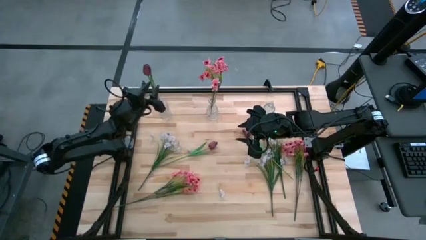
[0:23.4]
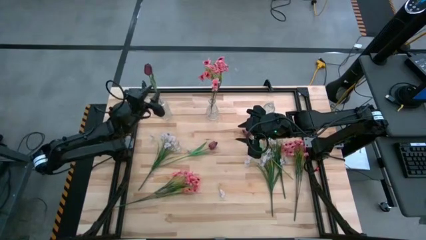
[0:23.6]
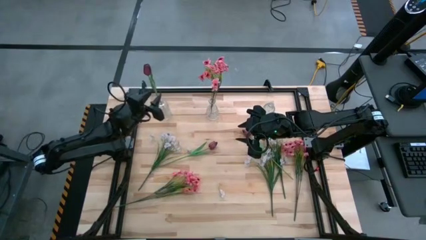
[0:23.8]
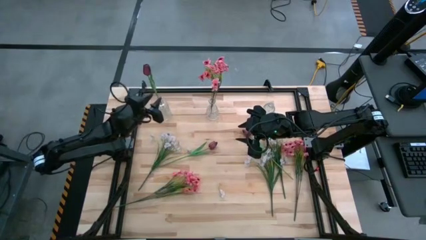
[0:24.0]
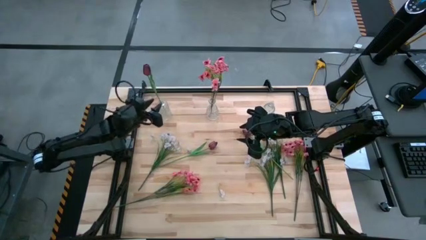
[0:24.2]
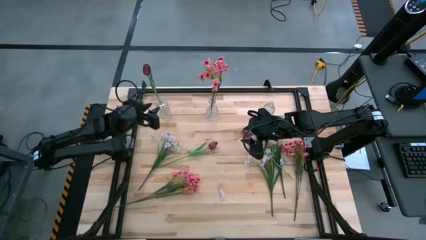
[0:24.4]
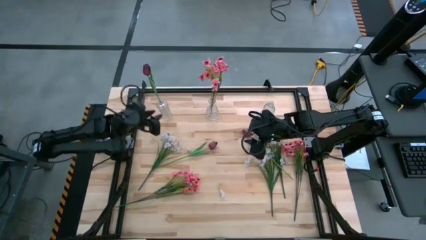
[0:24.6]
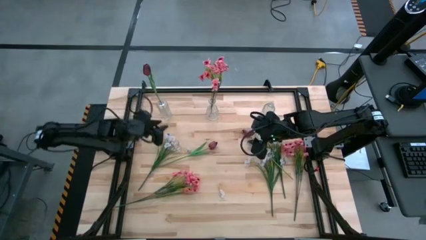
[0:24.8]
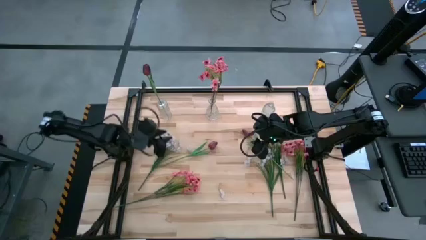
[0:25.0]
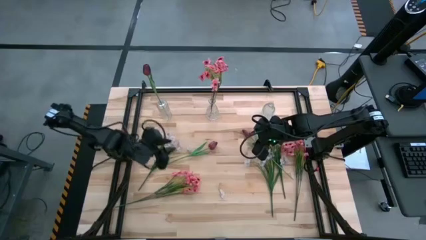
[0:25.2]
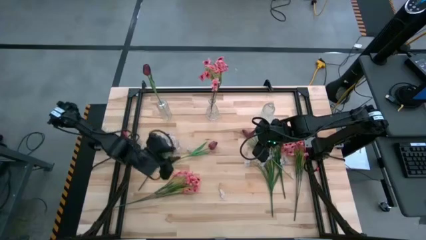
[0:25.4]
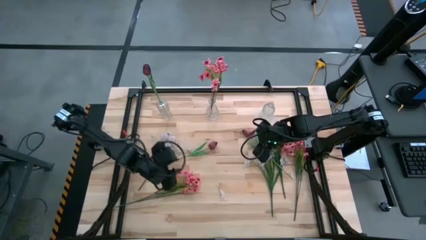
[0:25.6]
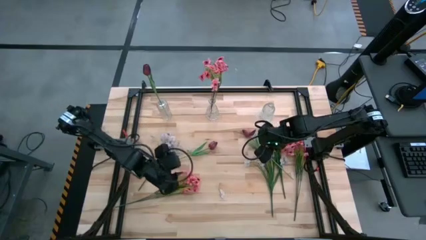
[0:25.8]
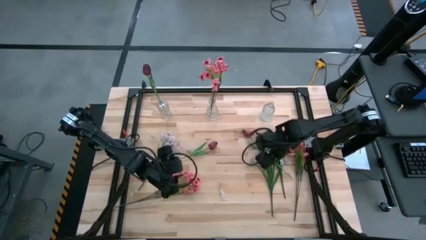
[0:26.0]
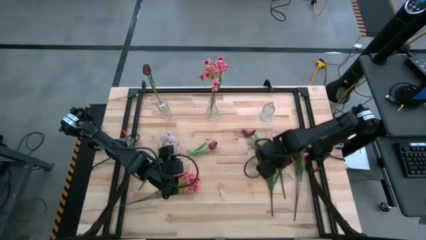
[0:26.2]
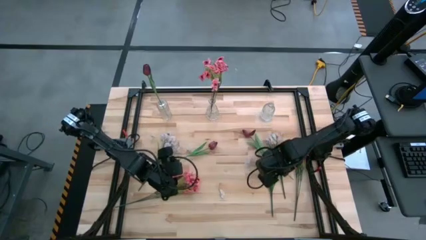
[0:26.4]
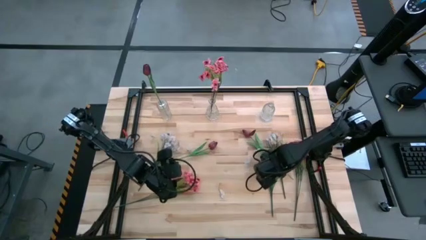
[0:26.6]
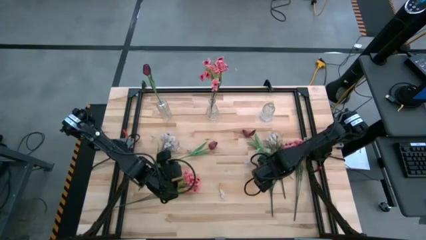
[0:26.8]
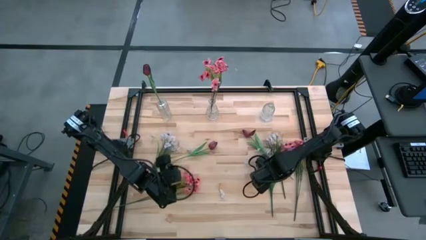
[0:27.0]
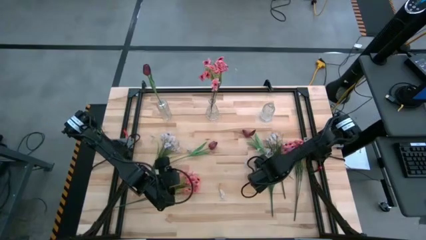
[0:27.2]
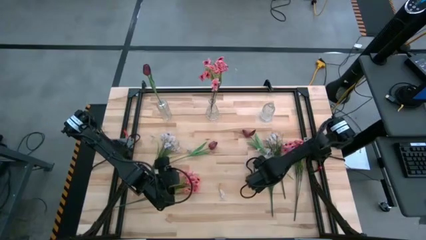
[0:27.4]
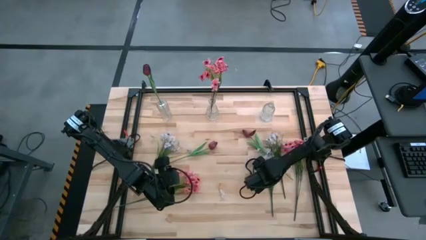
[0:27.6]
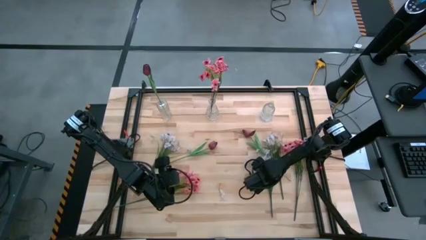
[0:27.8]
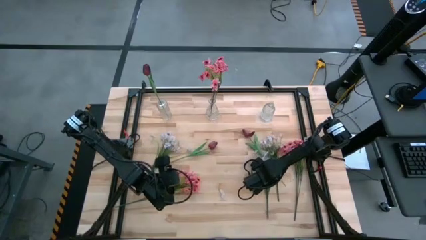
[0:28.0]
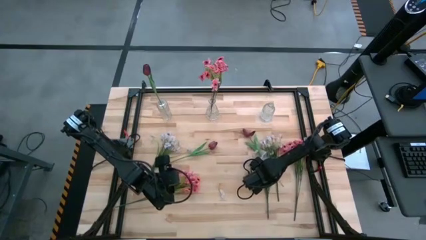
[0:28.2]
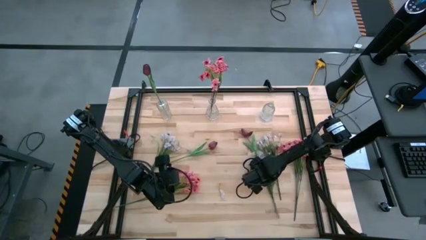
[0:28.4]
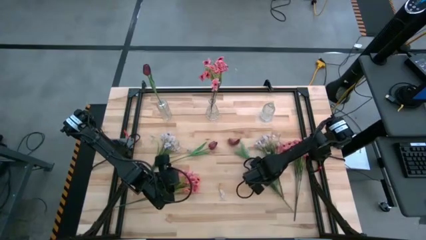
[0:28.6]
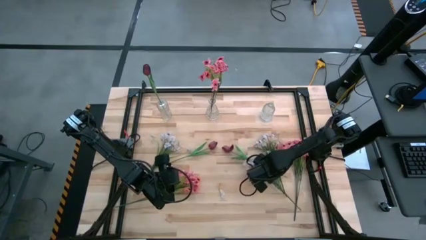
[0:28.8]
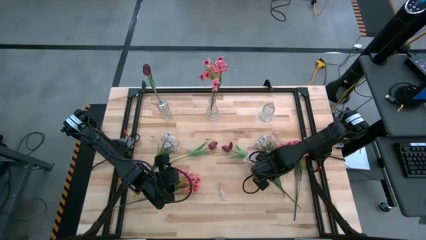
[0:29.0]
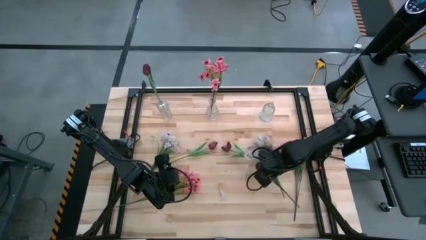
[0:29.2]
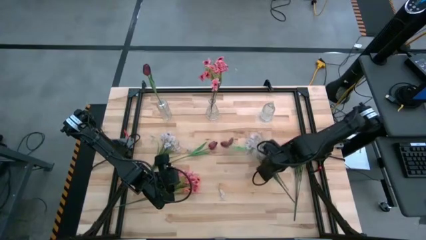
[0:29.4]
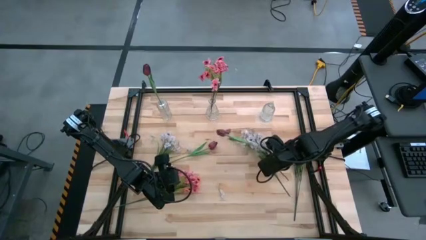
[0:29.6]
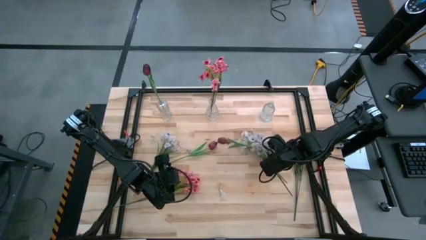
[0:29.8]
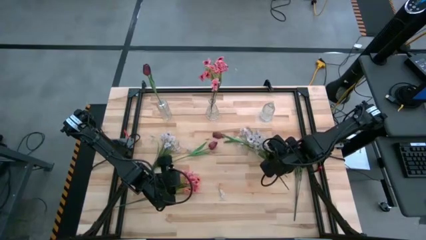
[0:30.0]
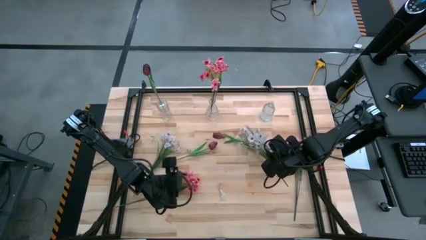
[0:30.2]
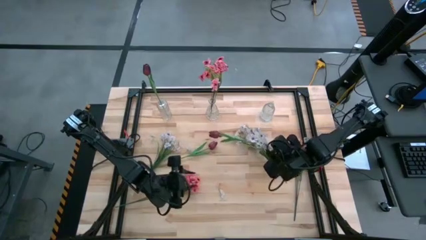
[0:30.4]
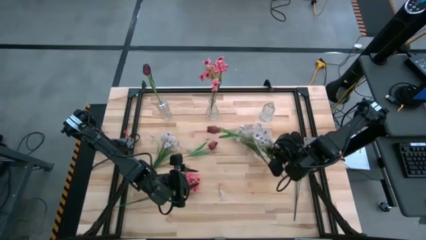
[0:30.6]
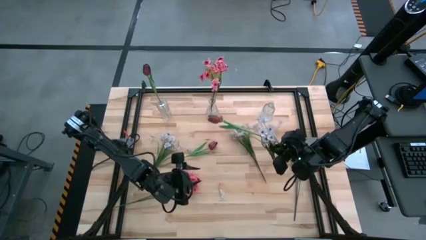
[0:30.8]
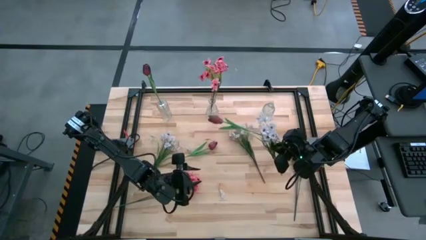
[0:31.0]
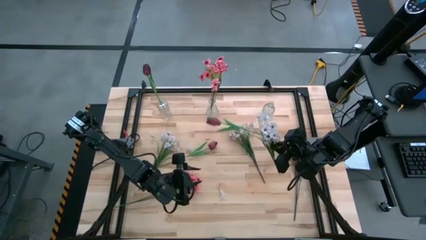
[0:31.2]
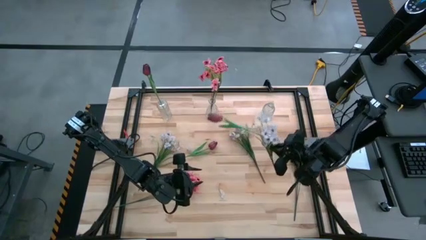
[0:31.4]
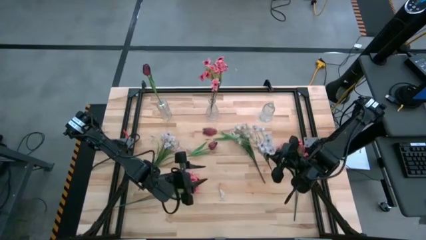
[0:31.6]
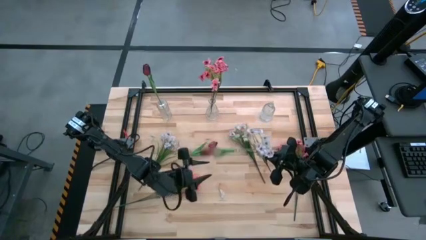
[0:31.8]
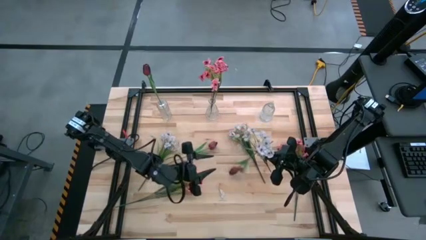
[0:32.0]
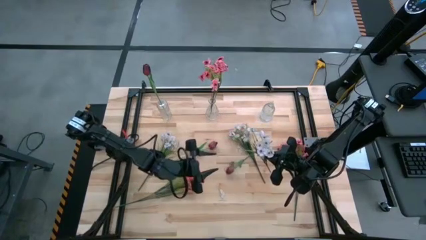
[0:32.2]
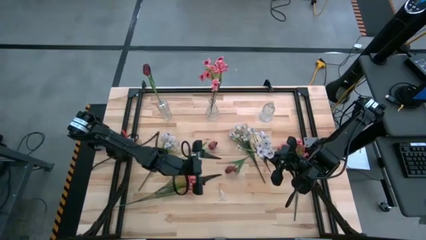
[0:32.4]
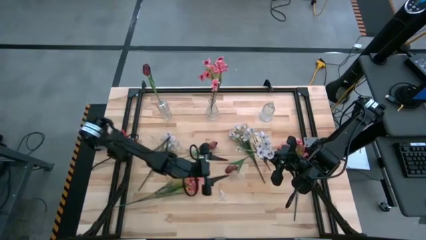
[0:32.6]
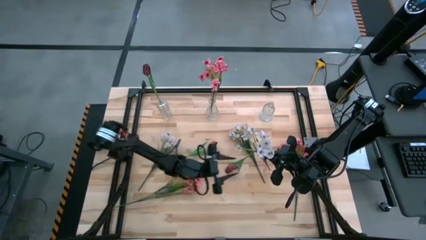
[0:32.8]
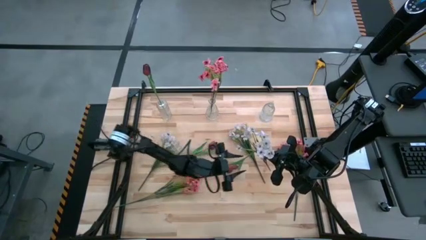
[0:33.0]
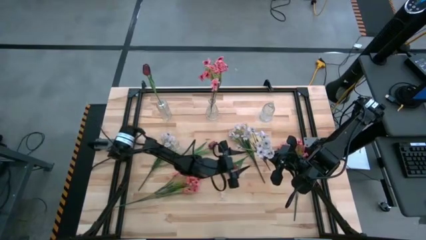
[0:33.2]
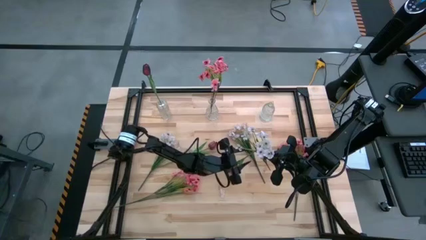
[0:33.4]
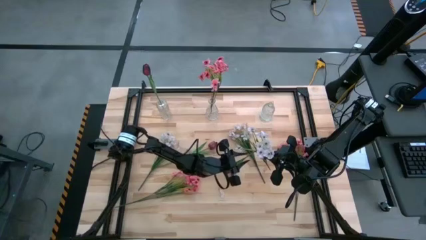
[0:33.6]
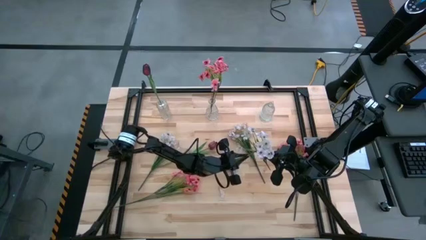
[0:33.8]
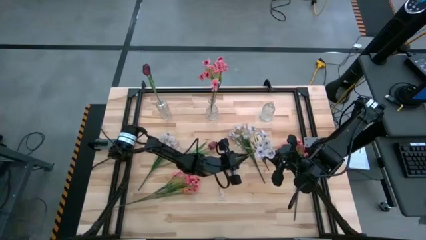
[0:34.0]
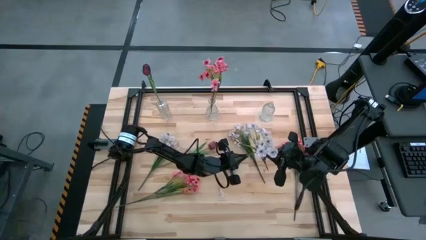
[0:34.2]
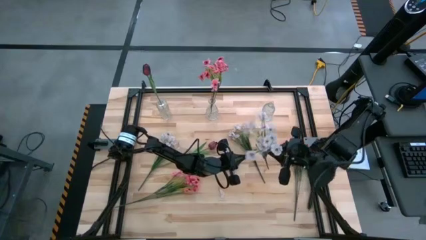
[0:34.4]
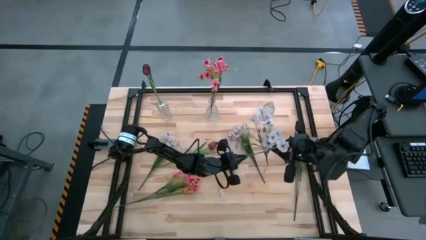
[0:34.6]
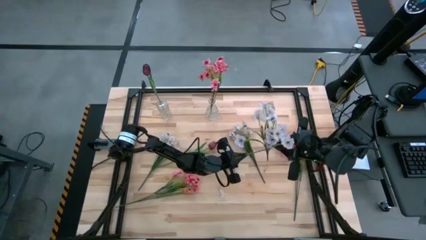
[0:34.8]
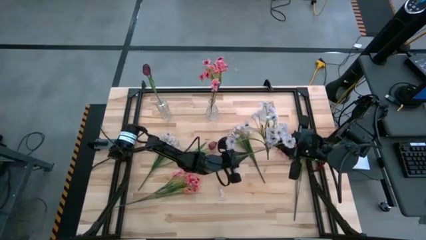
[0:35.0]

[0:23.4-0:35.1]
Task: Sort flowers into vase by color
Put the right white flowers into the right transparent vase

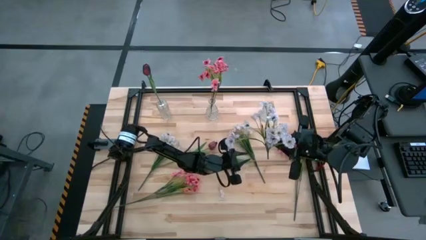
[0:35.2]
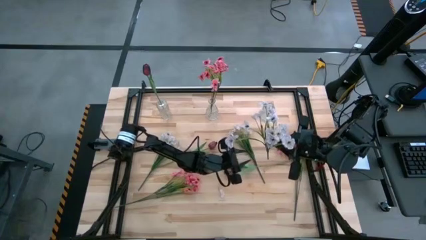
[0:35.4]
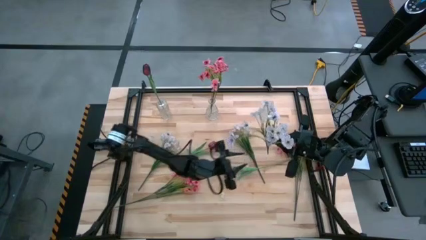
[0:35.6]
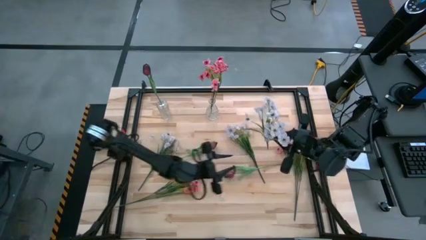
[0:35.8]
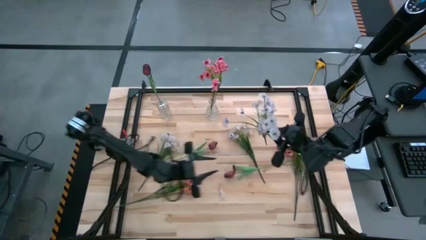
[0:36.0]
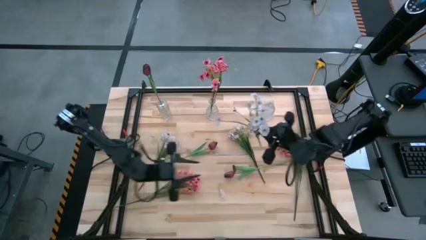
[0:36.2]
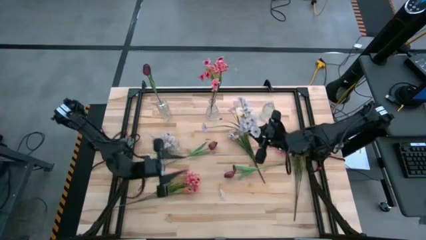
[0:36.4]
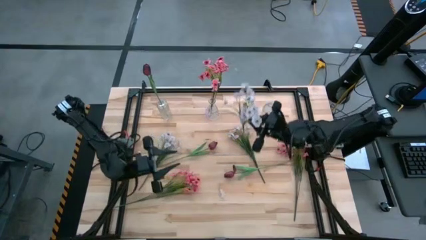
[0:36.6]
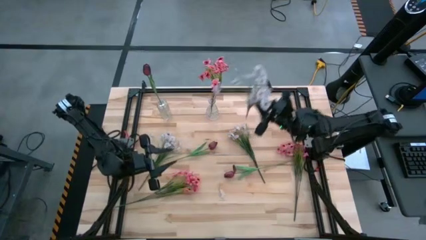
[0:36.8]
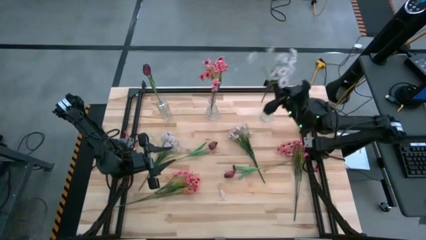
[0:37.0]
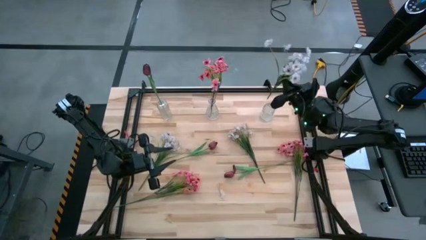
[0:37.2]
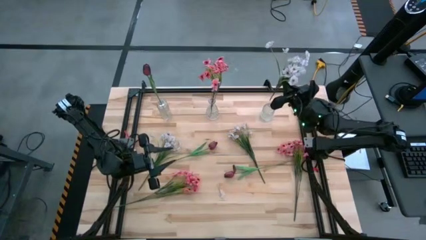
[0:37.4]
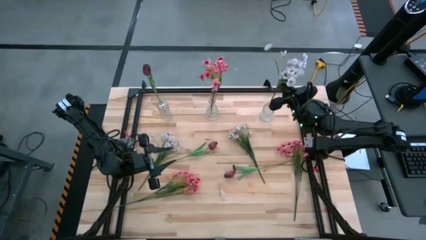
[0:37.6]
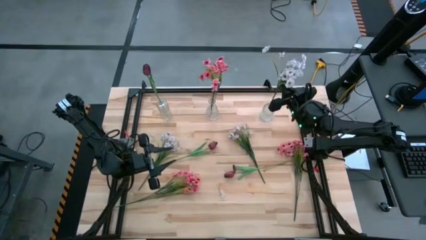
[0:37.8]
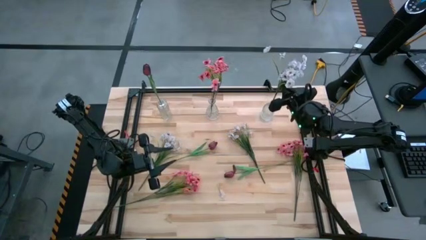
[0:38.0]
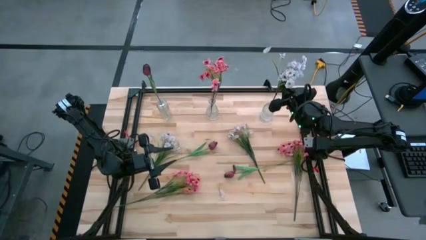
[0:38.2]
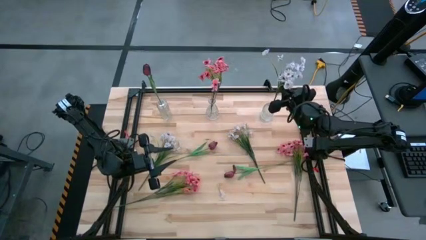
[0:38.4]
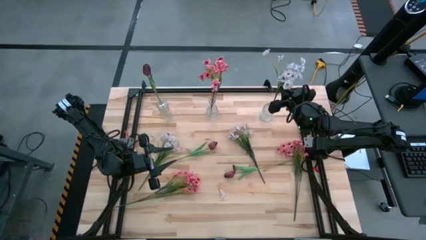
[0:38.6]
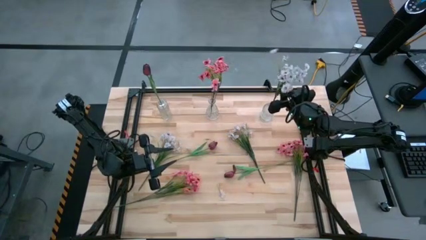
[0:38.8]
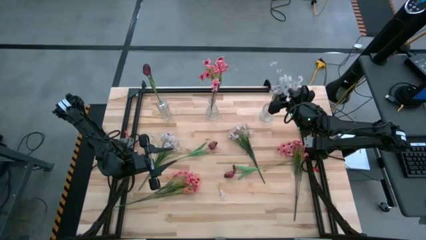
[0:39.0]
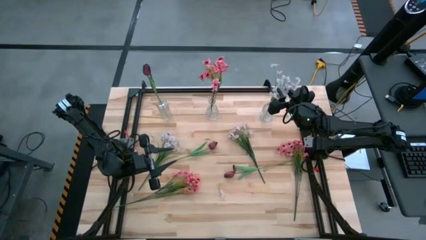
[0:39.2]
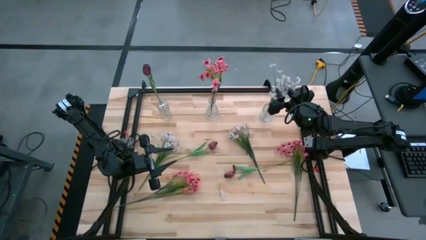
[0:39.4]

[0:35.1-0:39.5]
Put the right white flowers into the right transparent vase
